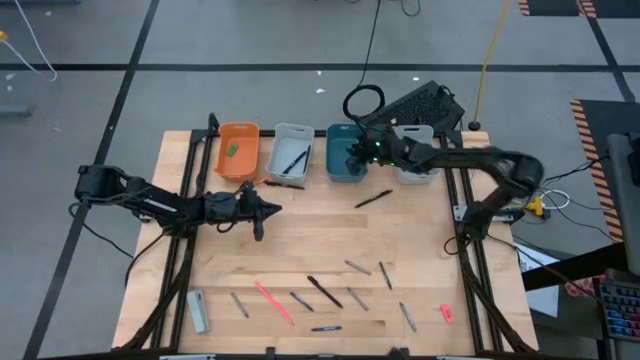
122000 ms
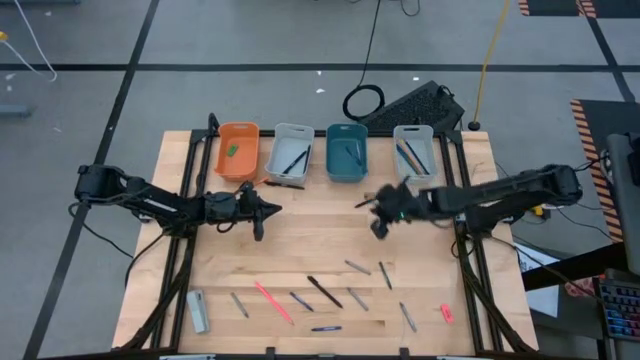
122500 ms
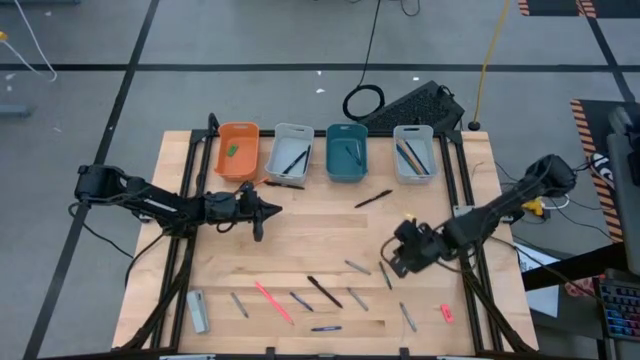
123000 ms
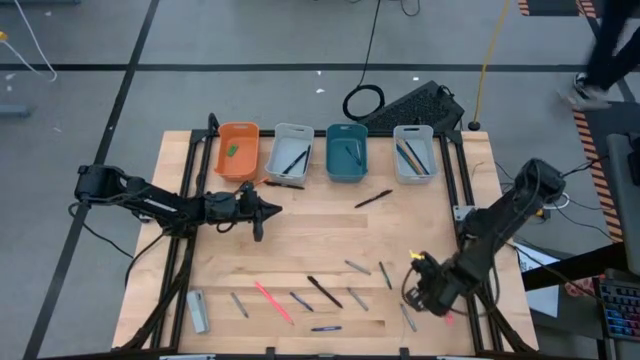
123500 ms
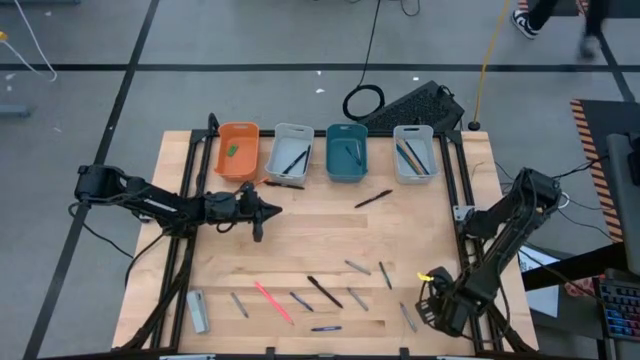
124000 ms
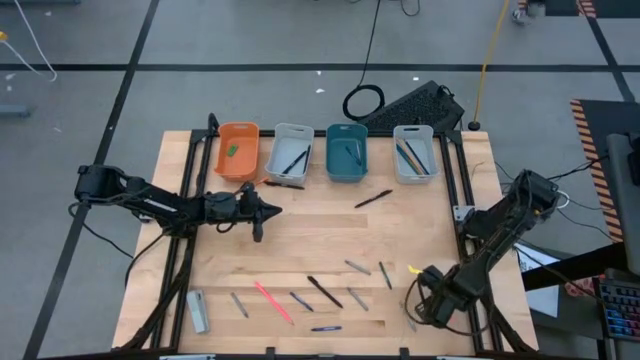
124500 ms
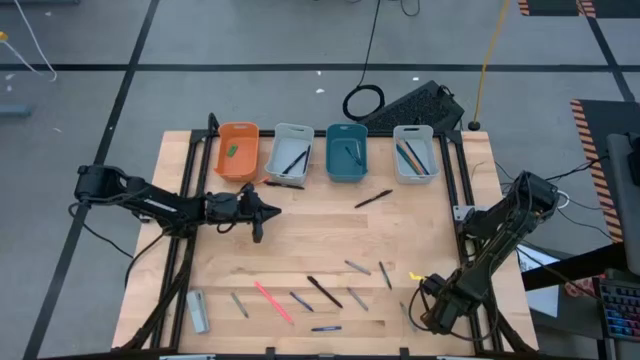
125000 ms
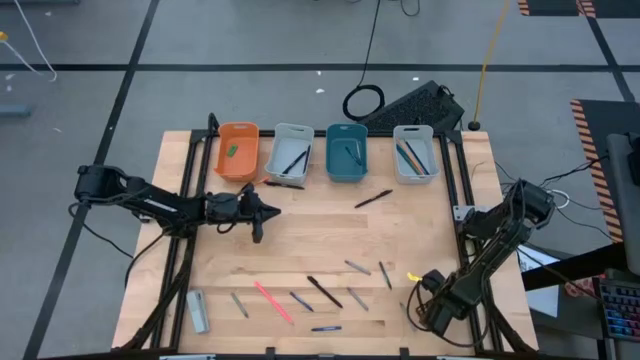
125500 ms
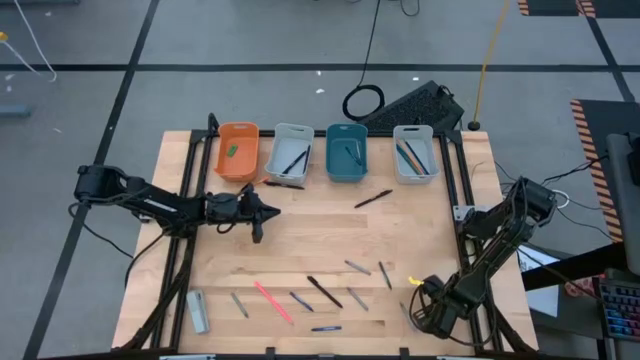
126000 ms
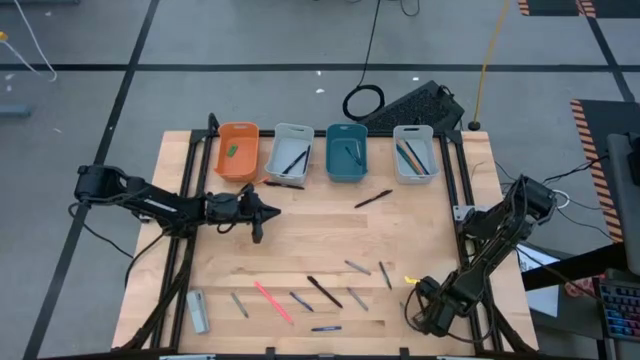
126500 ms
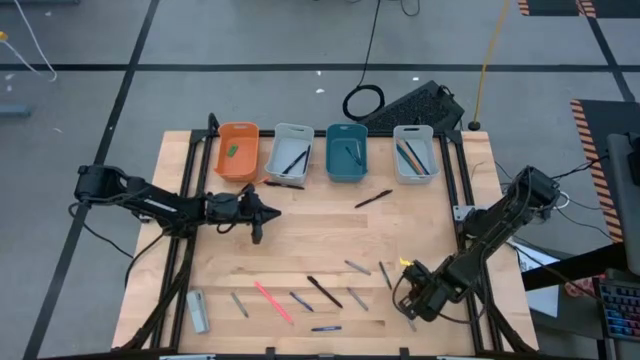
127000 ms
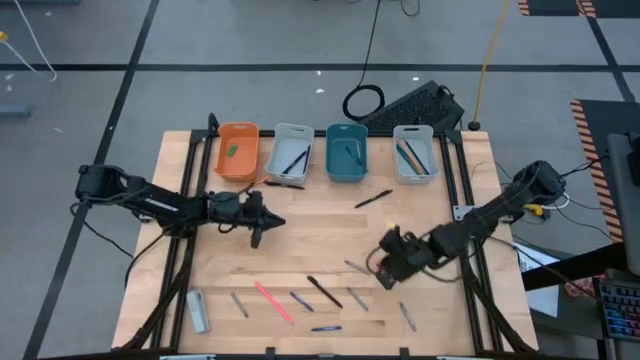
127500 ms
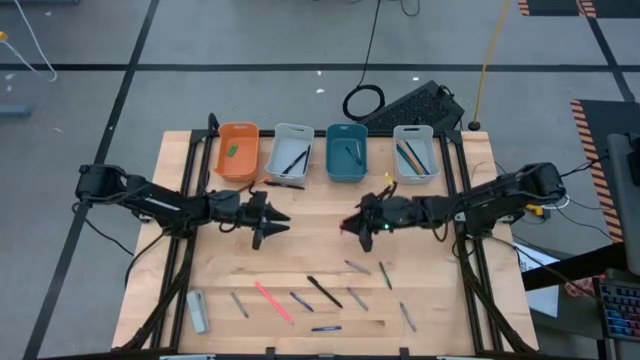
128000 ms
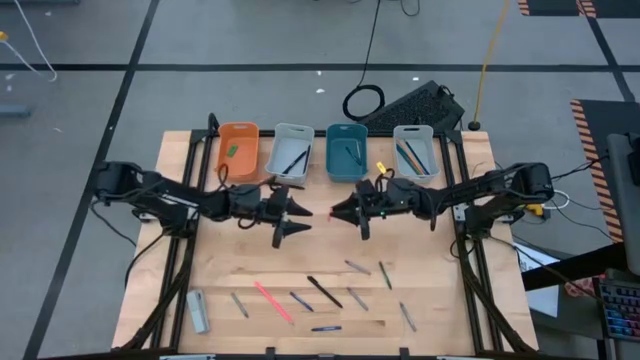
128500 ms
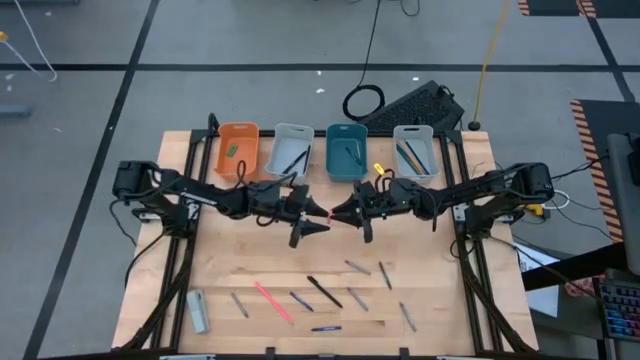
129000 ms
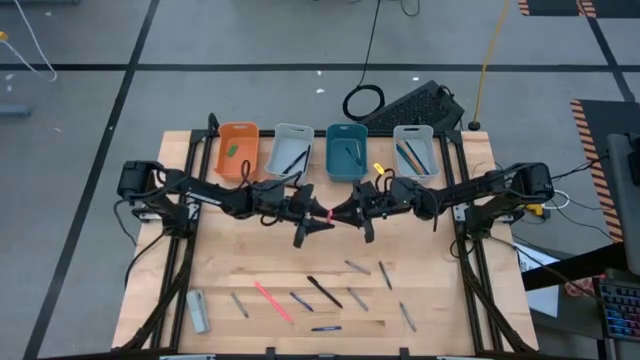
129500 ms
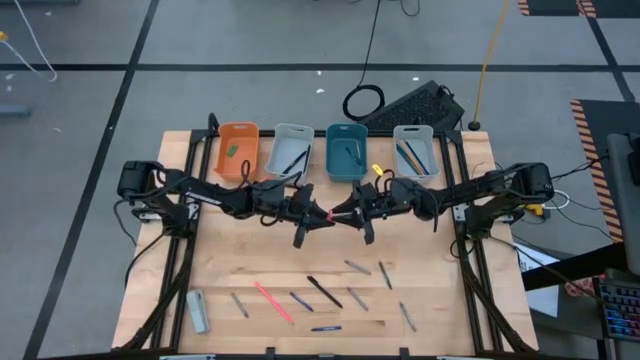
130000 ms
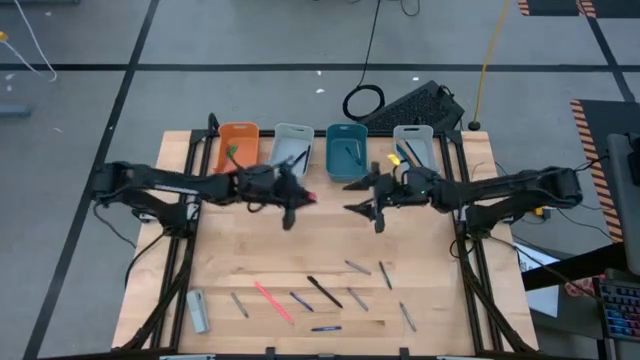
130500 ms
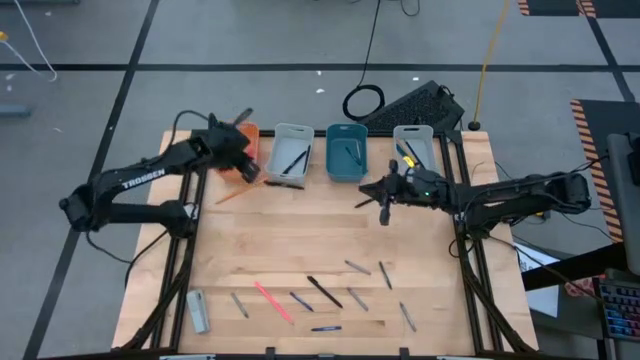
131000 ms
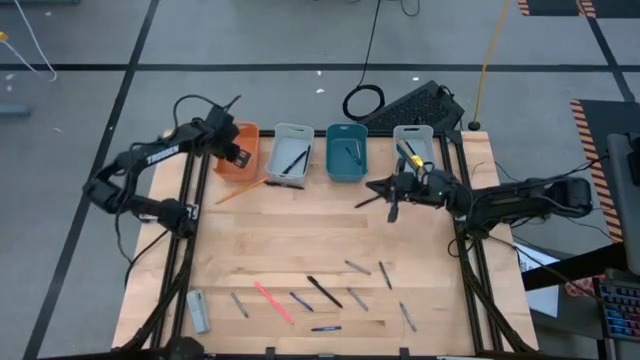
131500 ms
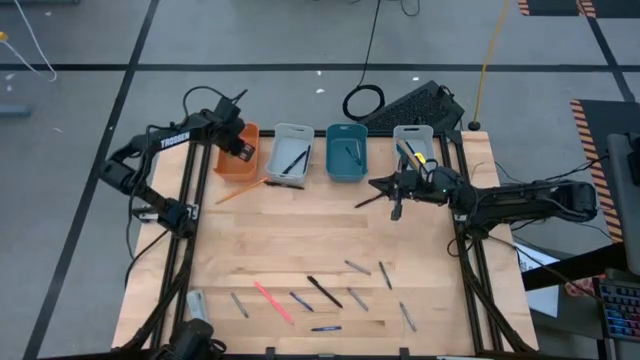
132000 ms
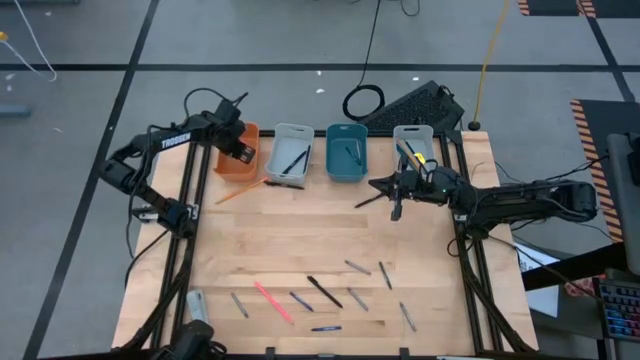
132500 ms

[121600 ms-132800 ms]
Task: Sort crayons/erasers/pens/pencils in bins
Put the pink eraser into the orange bin

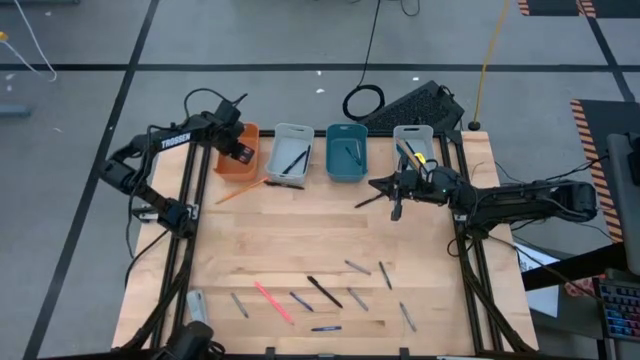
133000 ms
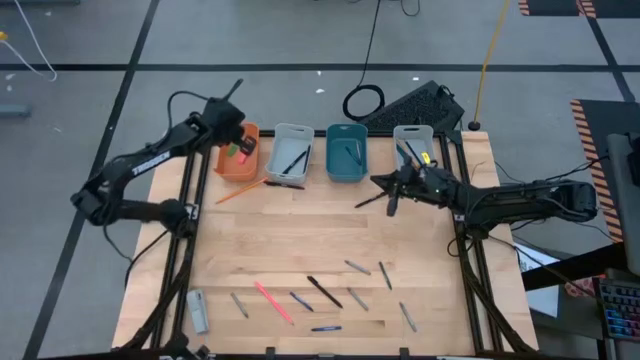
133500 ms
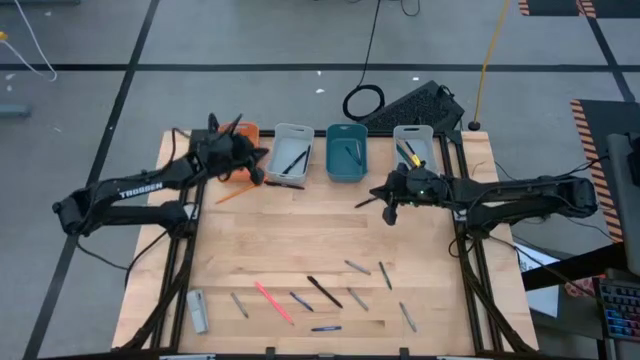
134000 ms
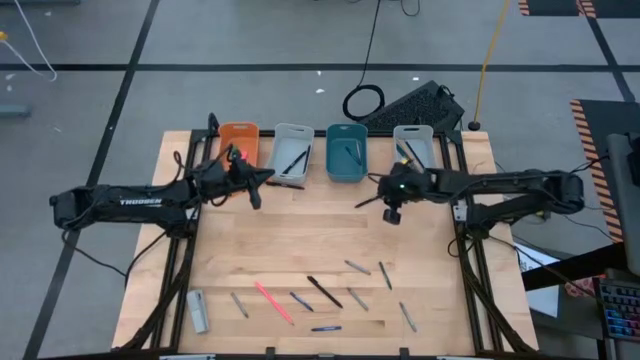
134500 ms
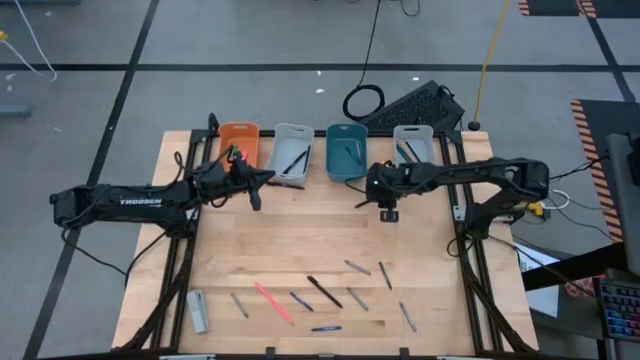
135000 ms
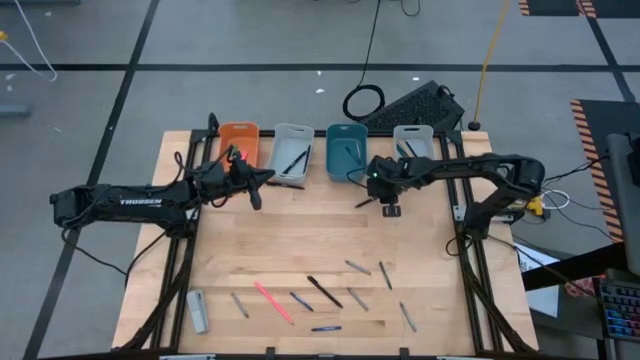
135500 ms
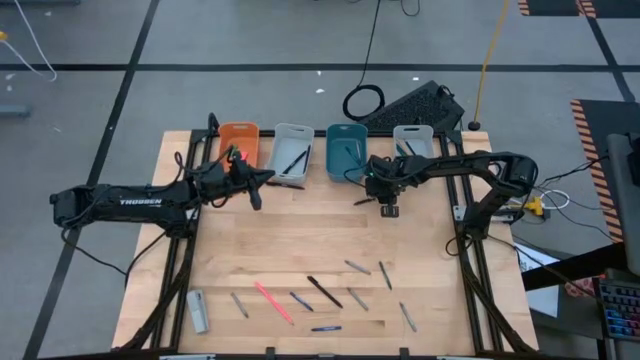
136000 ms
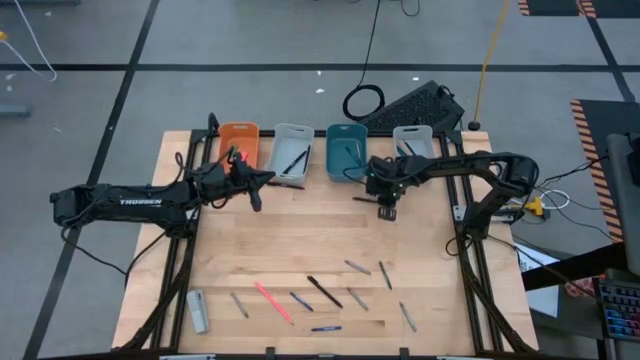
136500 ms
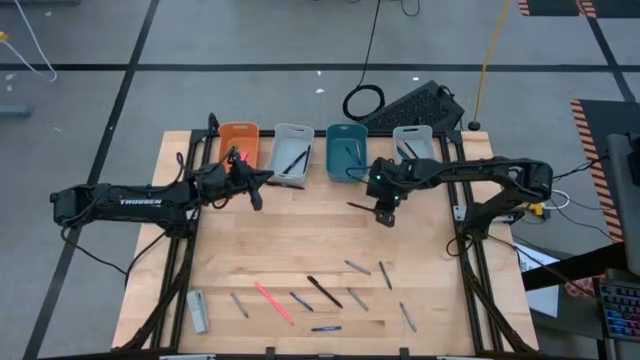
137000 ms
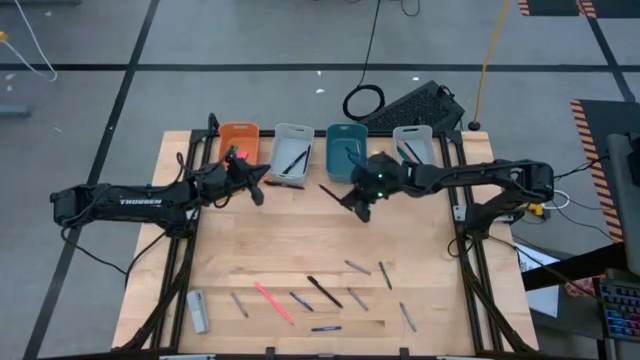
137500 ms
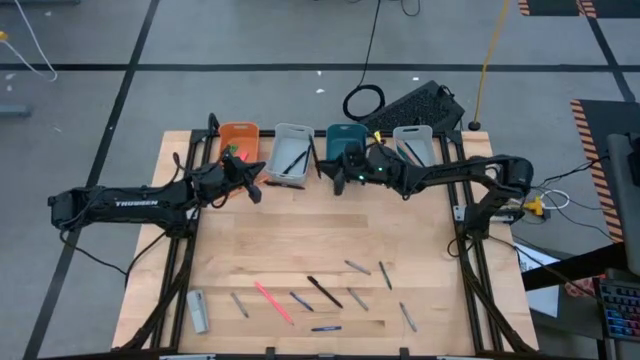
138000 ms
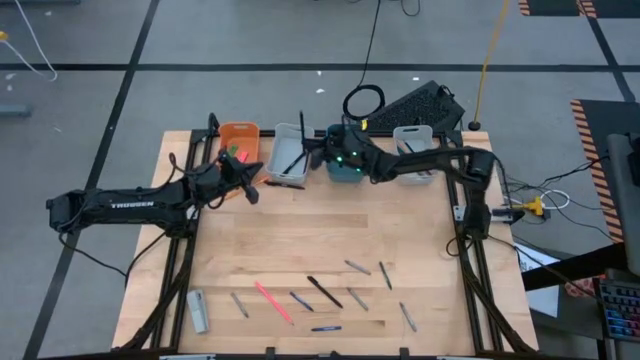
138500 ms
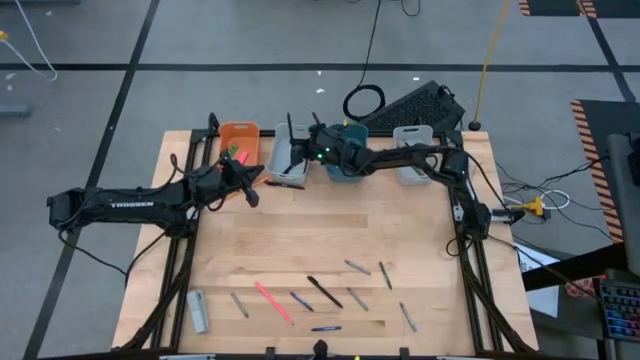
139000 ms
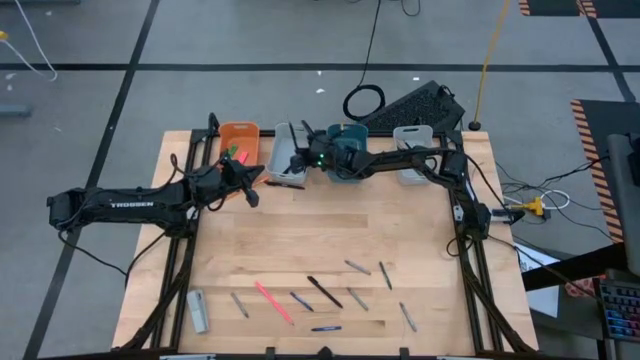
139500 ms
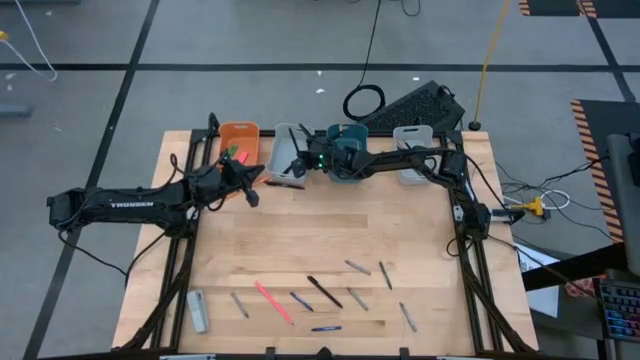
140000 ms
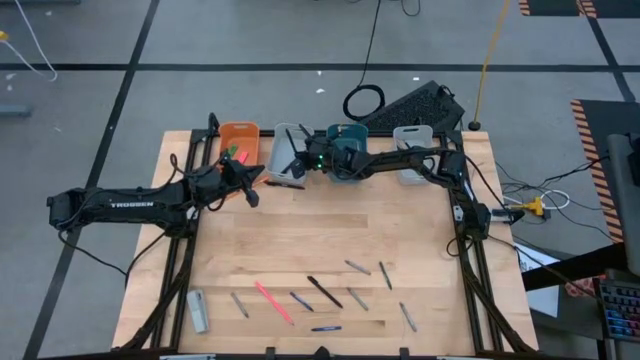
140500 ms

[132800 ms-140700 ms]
Put the black pen into the left gray bin
